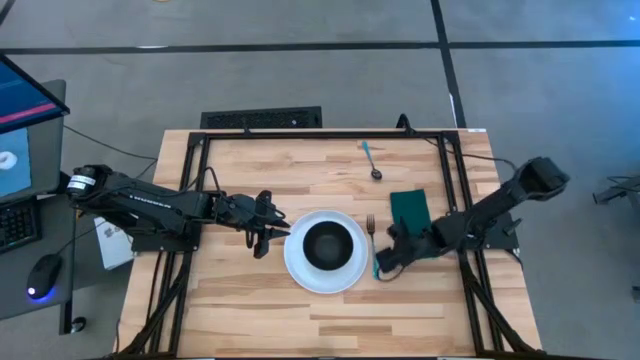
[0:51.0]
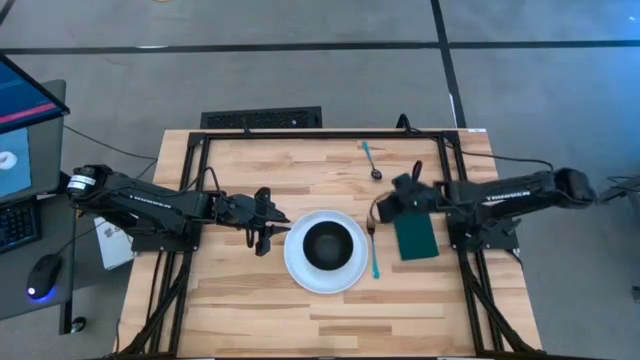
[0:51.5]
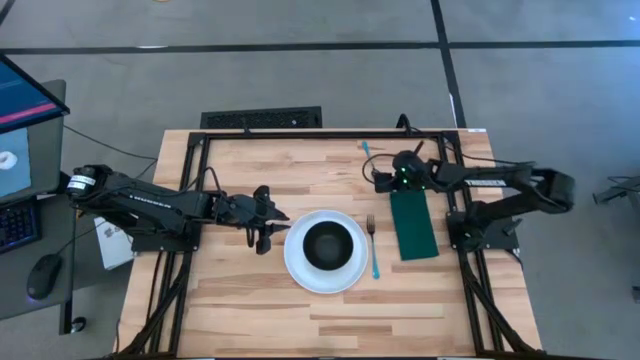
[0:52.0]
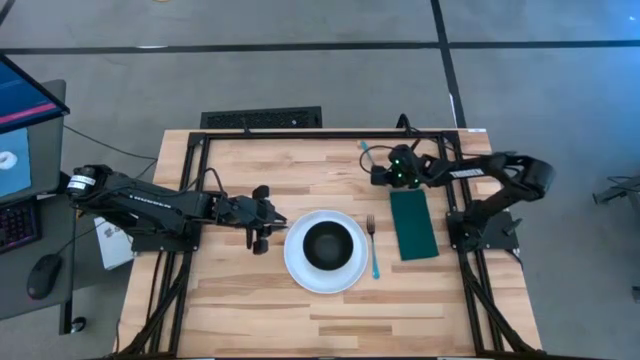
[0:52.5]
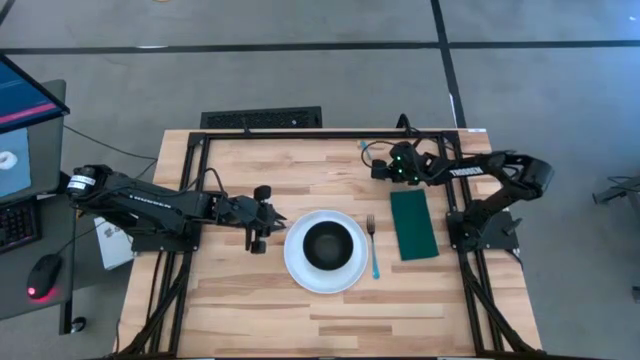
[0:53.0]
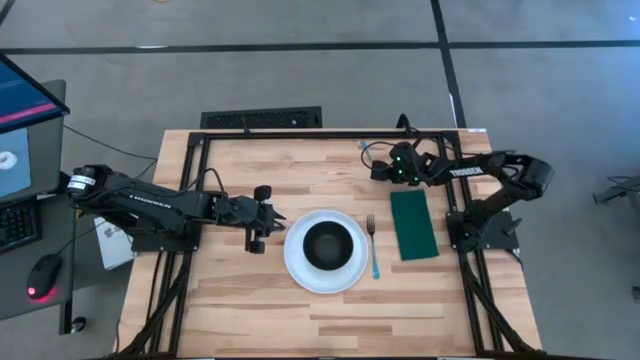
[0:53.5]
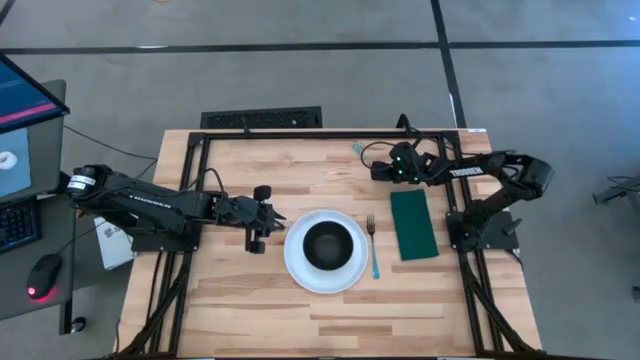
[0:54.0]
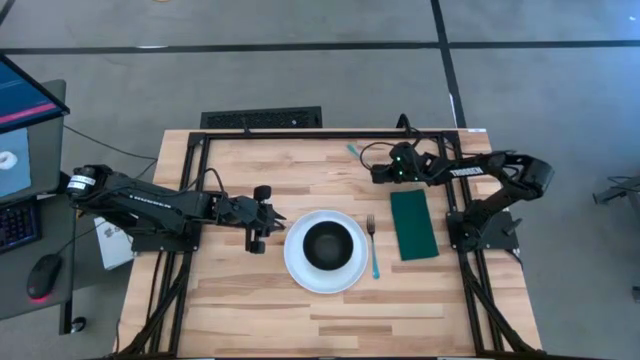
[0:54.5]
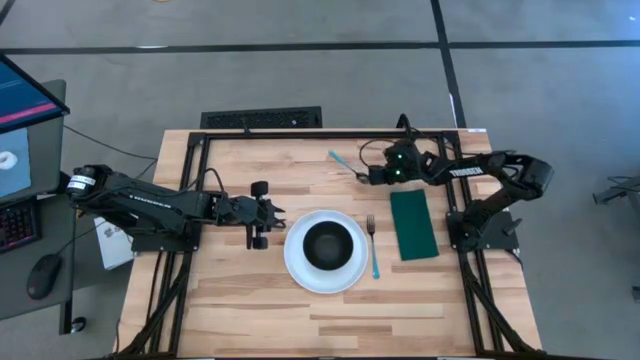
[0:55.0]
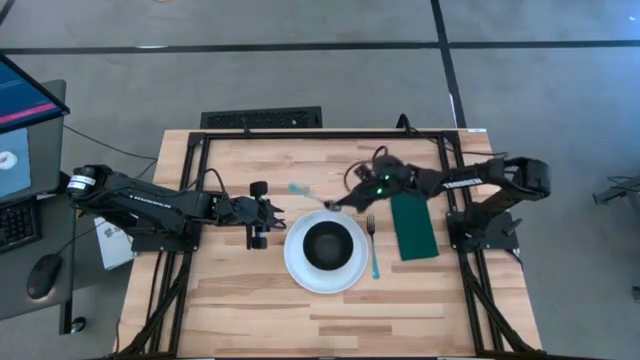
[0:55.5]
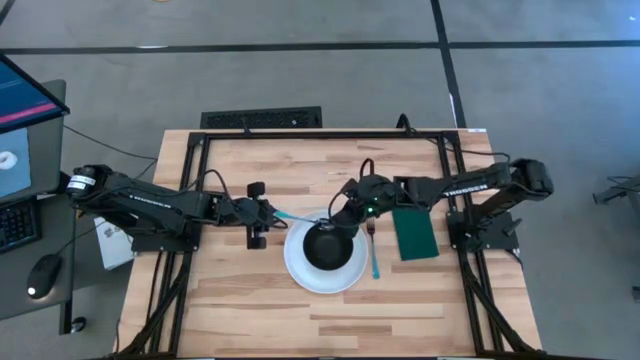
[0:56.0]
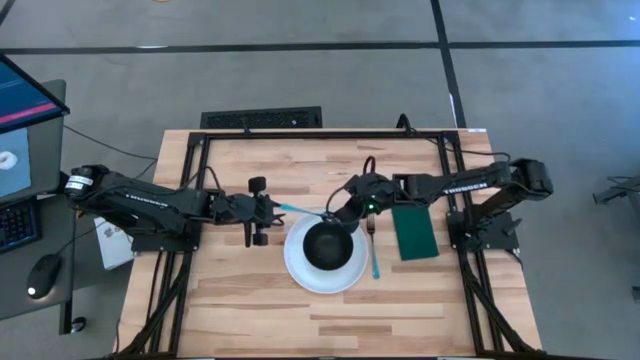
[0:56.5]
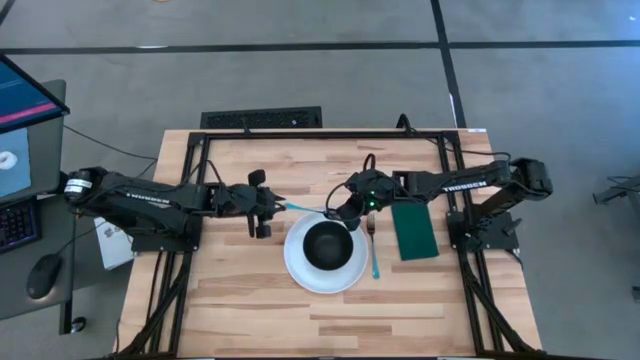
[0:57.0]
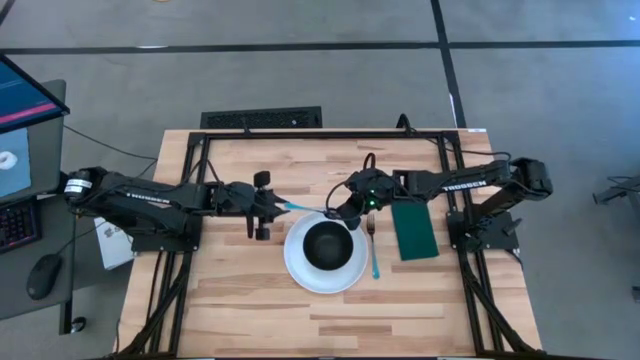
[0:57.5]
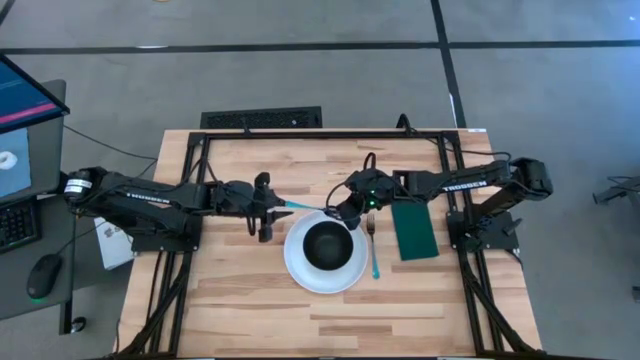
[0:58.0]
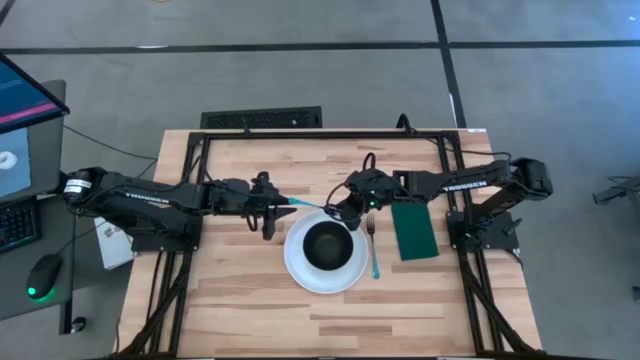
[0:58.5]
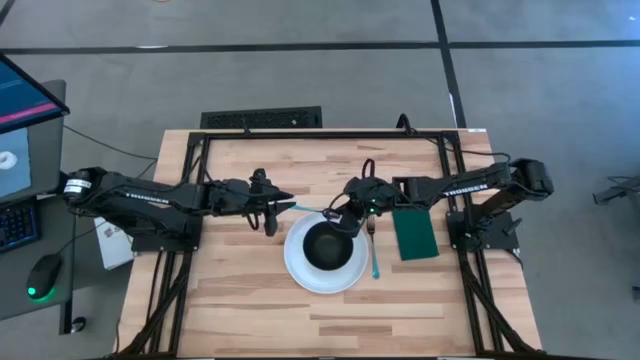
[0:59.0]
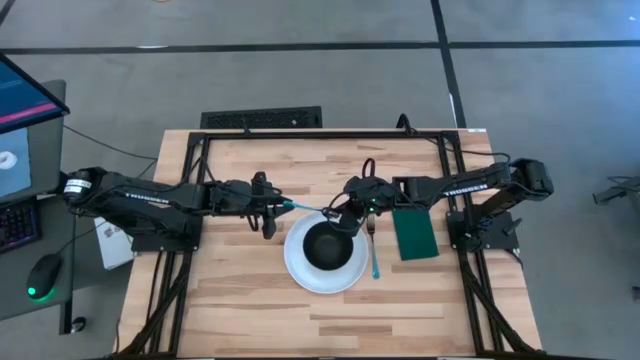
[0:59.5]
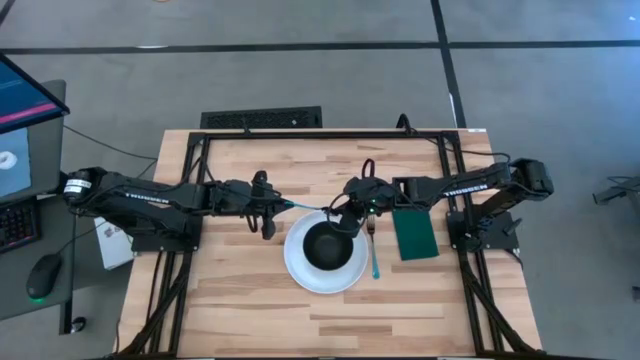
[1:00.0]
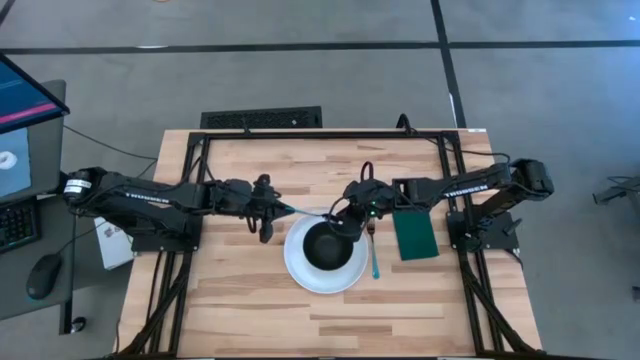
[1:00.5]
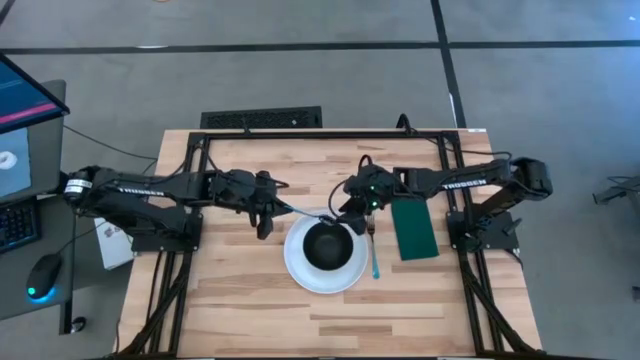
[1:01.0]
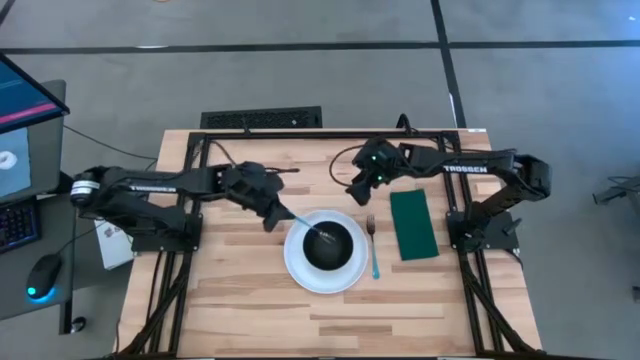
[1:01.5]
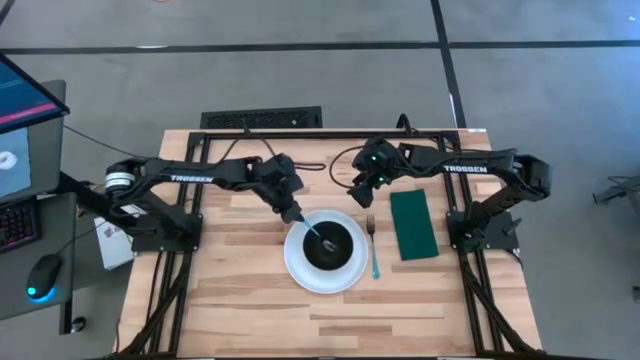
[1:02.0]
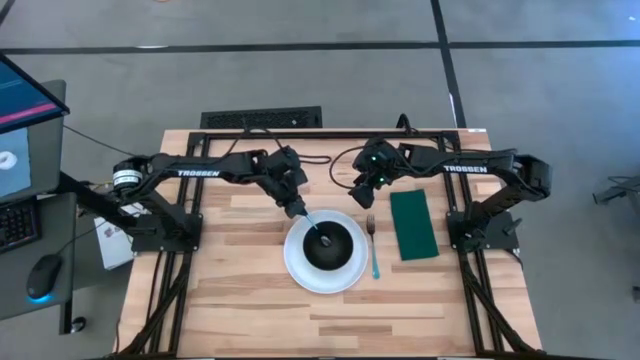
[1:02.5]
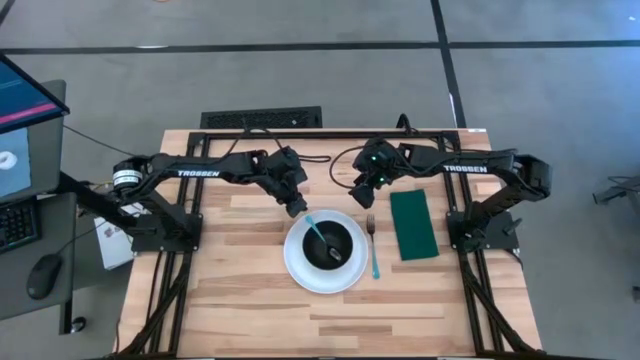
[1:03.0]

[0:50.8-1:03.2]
Task: Set table place
Put the blue spoon in the black bowl

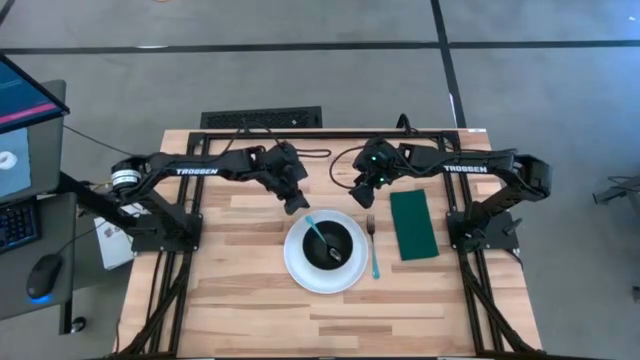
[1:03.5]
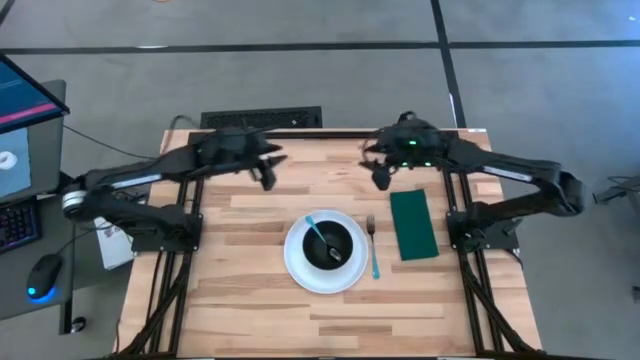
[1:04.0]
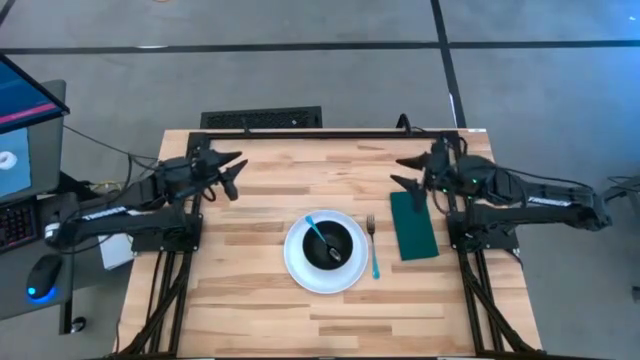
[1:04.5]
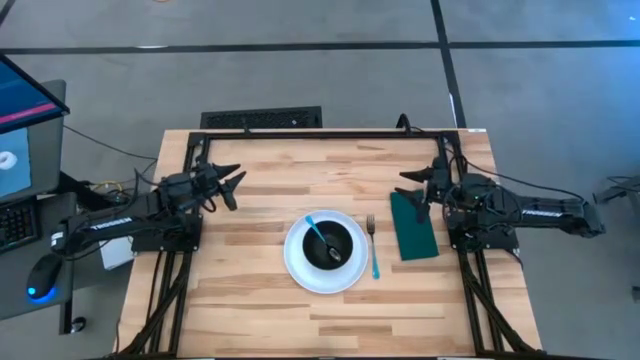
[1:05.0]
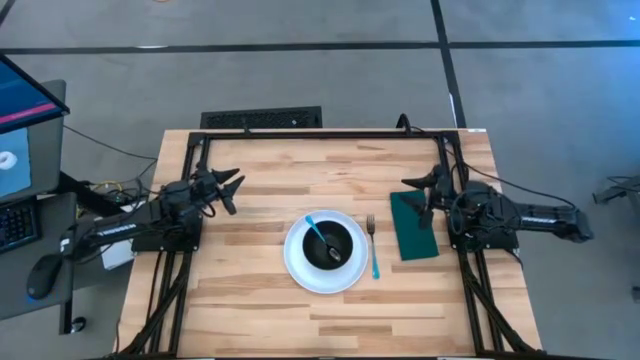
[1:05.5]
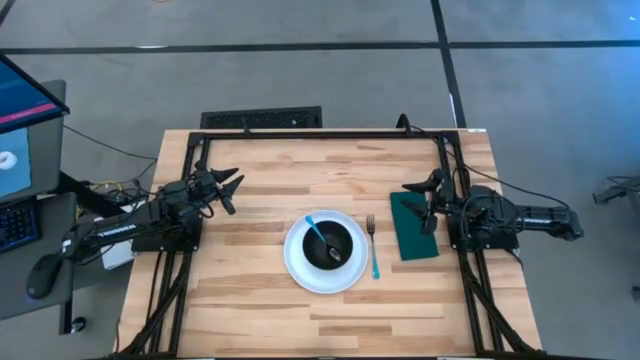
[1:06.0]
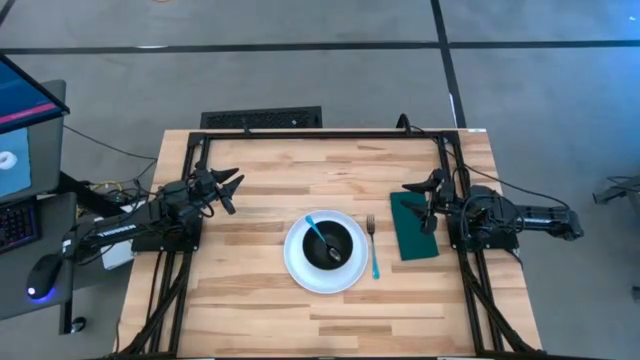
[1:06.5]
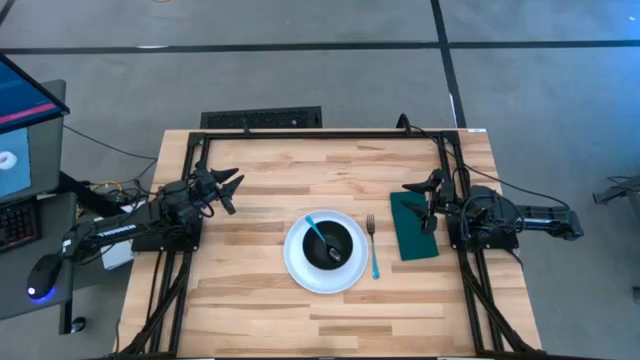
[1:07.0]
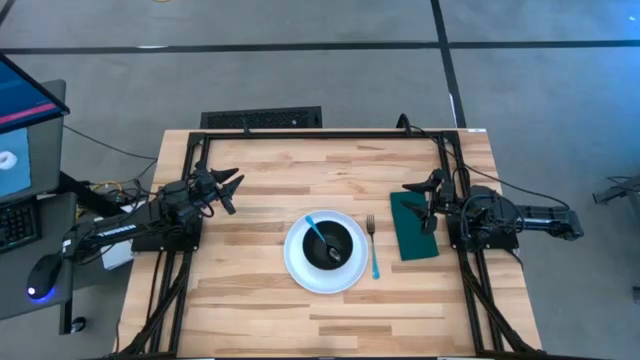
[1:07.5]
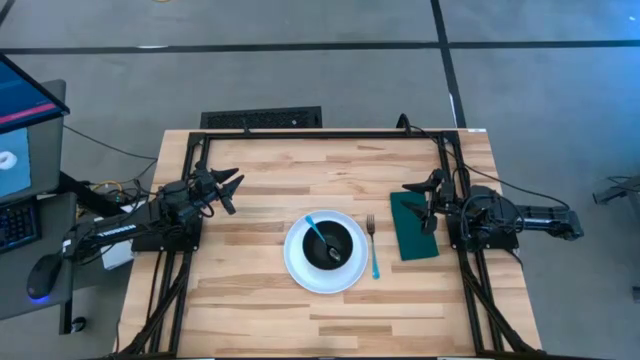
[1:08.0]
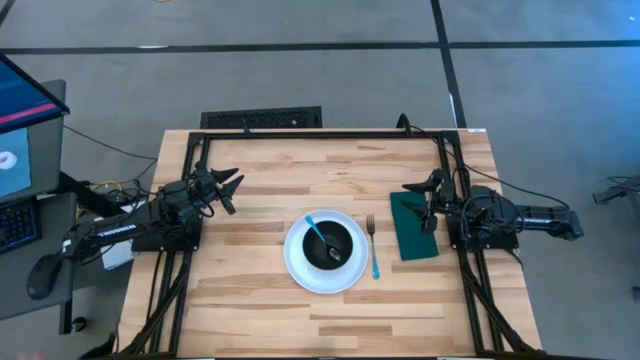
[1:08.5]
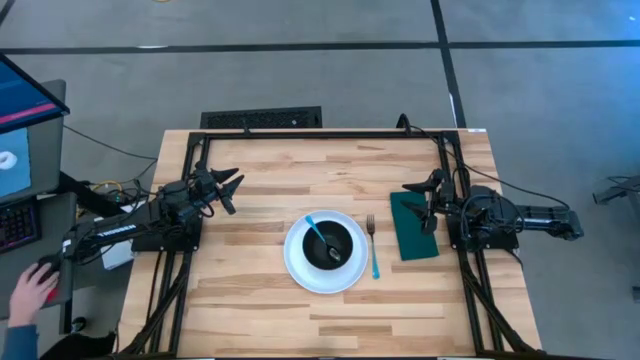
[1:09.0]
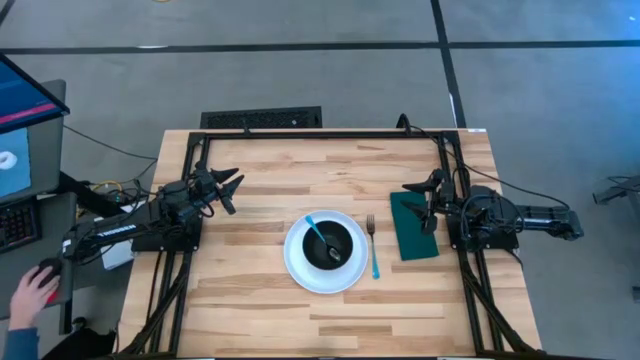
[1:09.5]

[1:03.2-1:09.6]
Return to Home Position

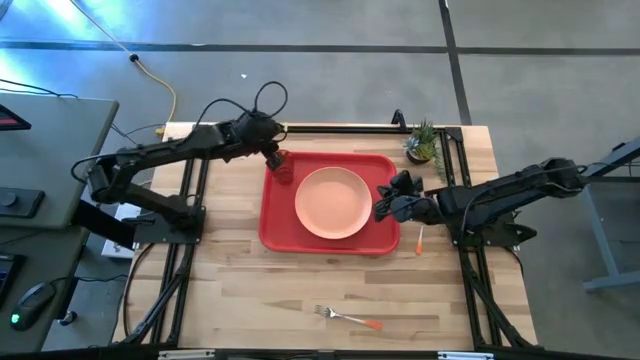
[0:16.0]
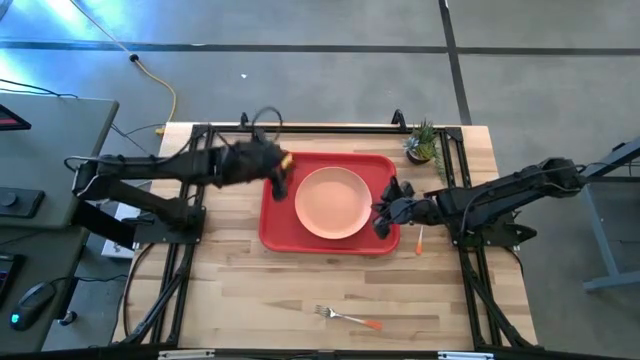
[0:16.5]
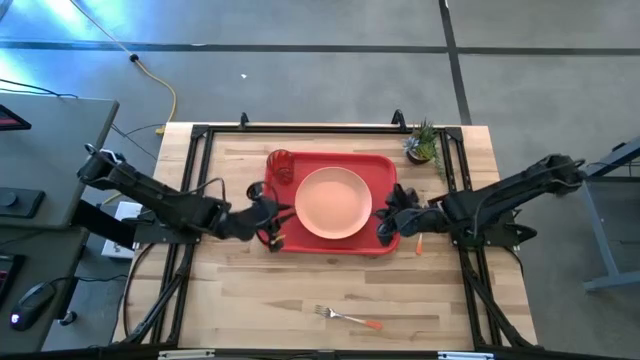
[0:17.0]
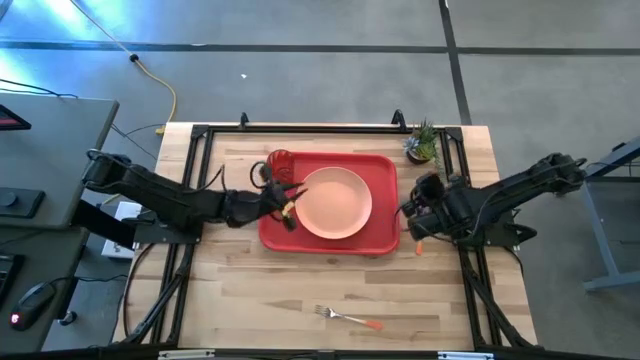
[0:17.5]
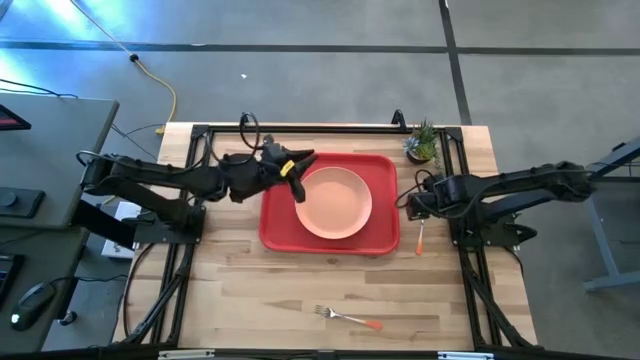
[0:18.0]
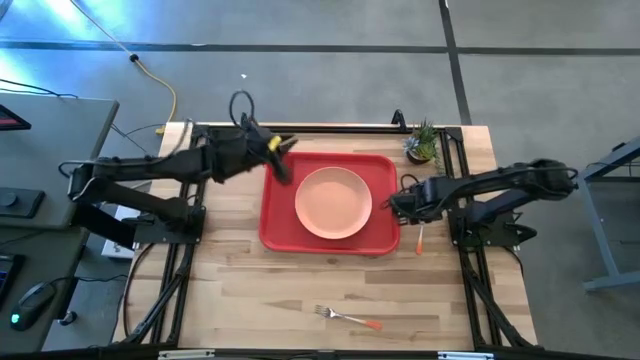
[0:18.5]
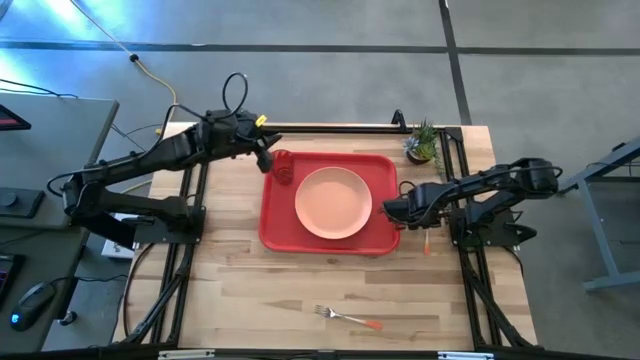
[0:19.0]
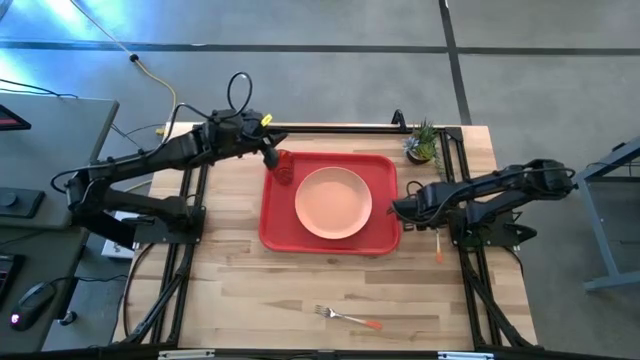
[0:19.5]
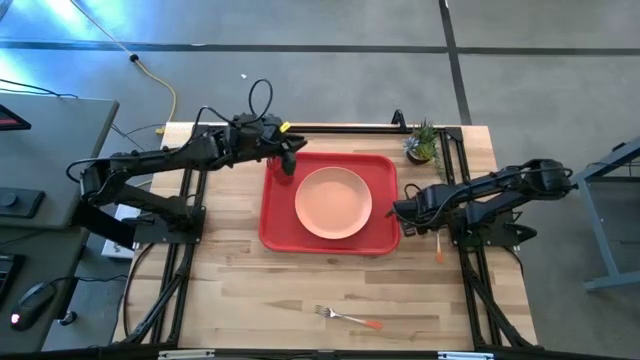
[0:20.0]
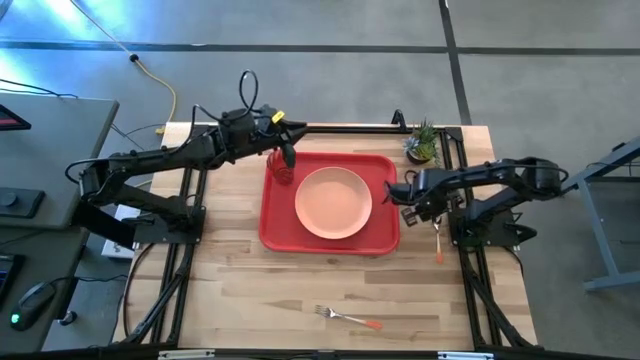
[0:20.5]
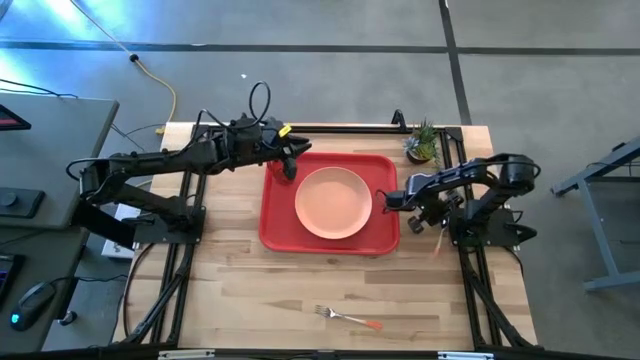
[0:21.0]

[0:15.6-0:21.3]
Task: Pick and place plate/cup/fork/spoon on tray
Put the orange spoon on the red tray to the right of the orange plate
